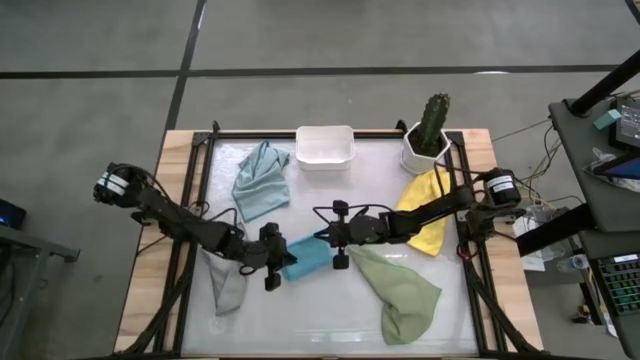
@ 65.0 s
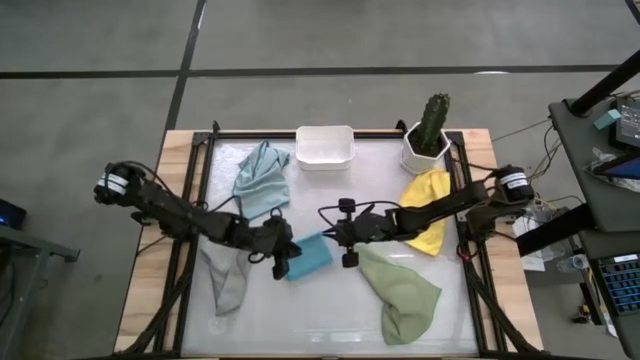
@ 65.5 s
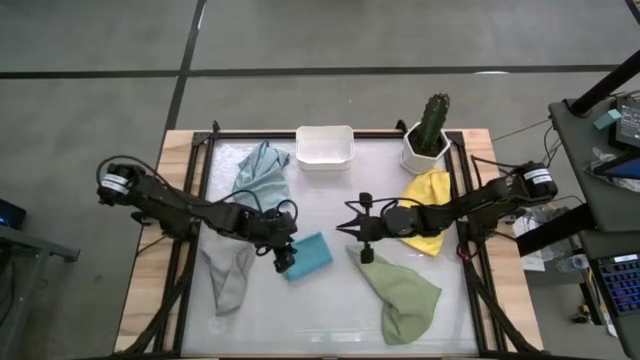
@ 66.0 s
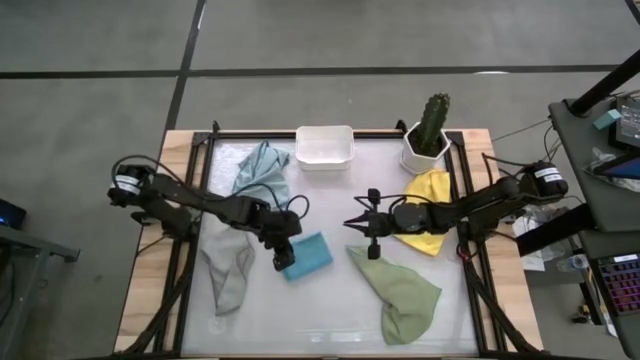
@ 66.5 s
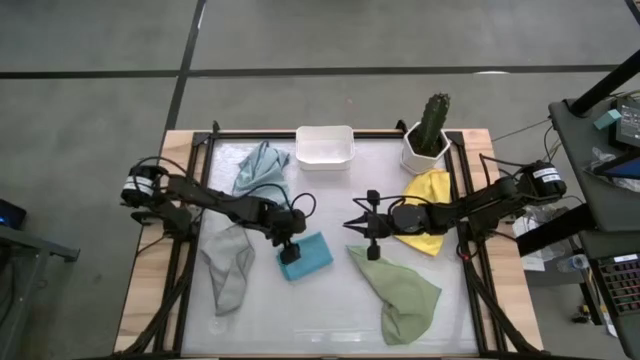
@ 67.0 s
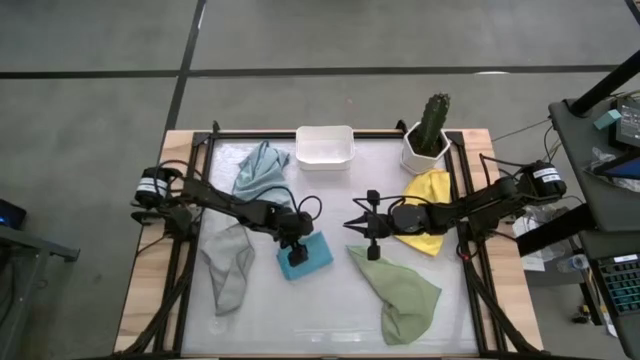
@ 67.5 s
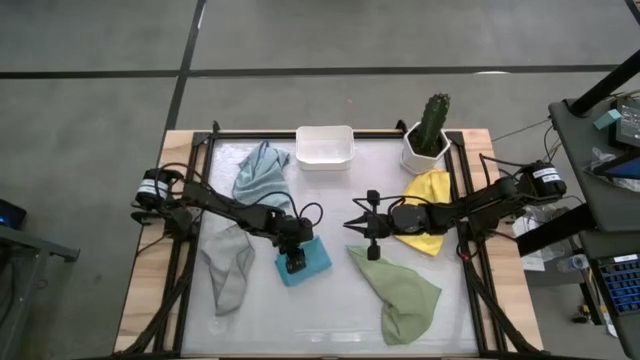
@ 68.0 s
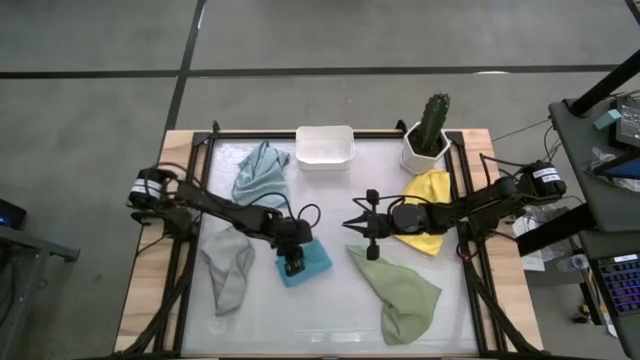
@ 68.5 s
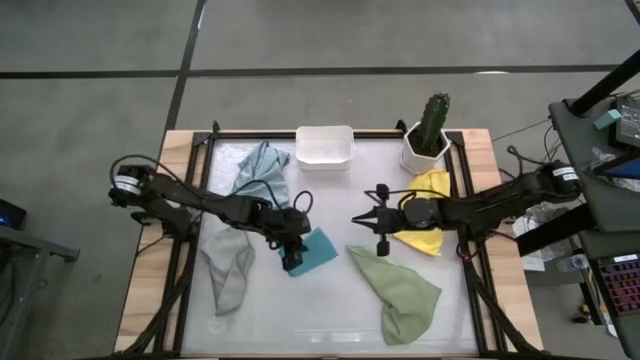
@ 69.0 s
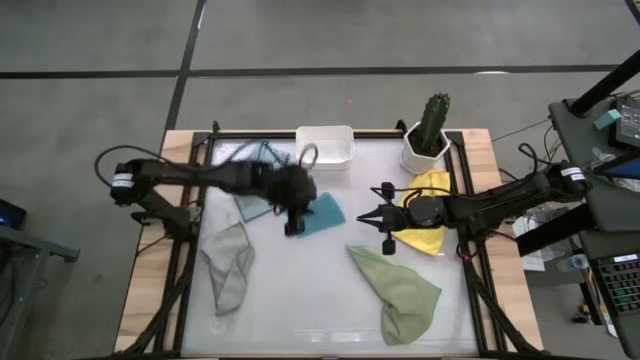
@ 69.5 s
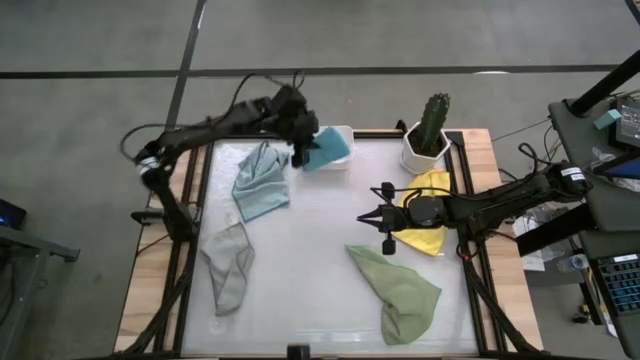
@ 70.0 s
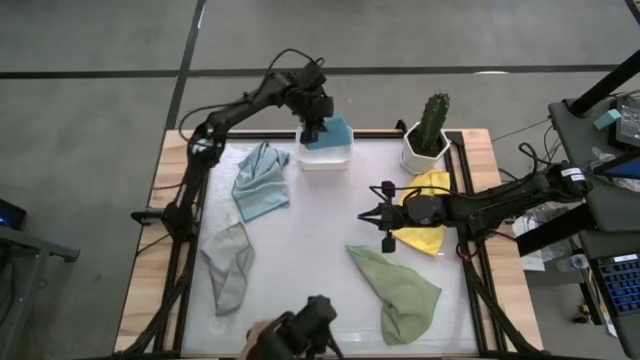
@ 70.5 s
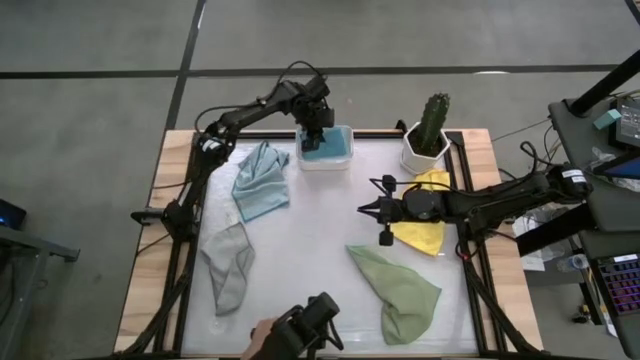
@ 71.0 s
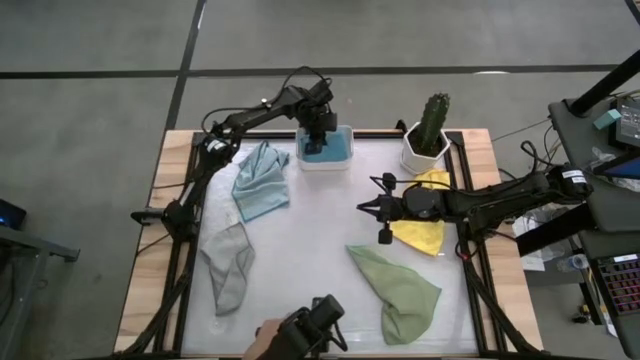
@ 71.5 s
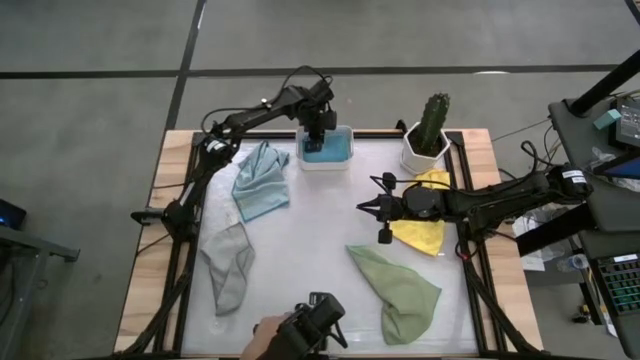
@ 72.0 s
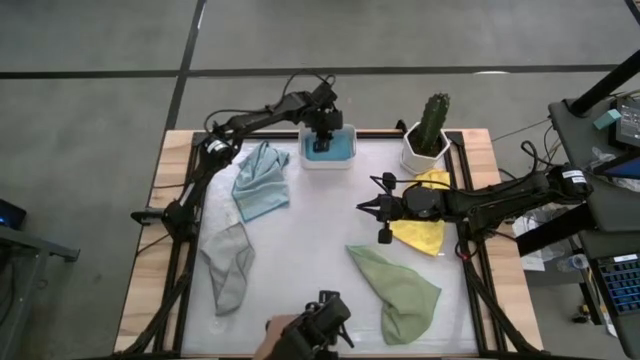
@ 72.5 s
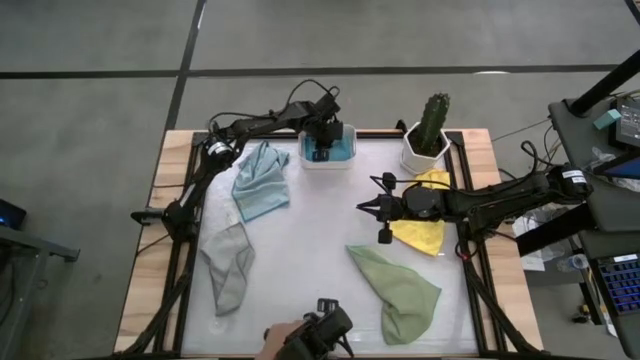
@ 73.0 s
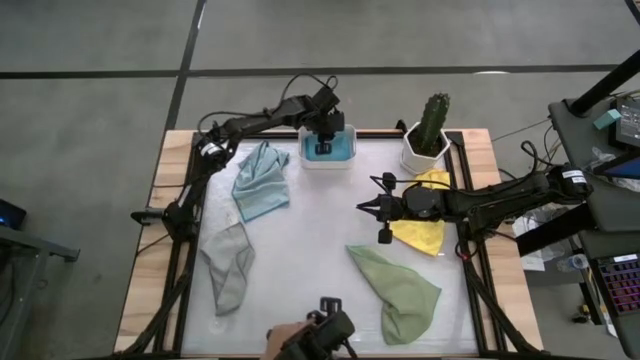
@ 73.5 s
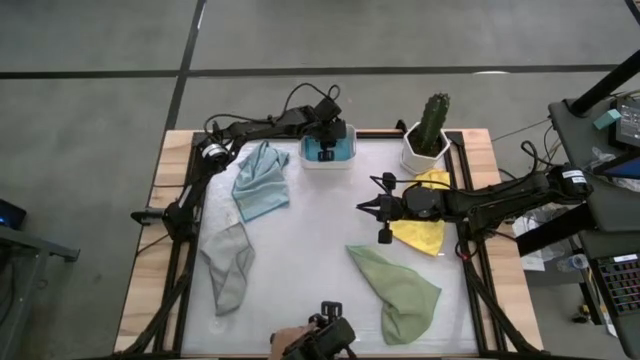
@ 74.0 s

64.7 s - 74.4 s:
Task: Fold microfiber towels
Put the blue cloth into the bin
